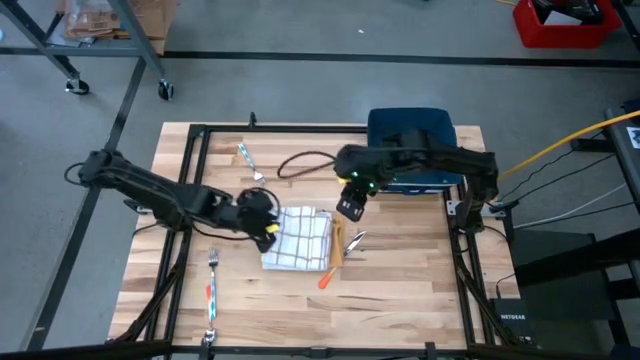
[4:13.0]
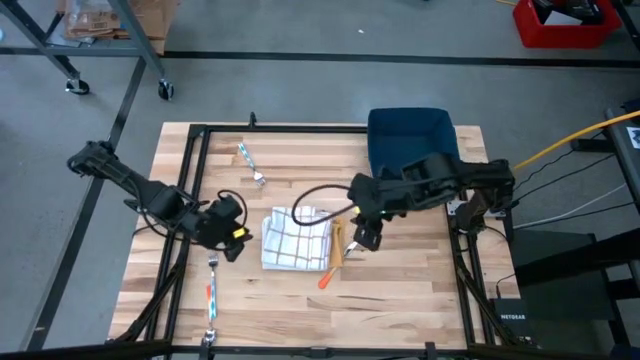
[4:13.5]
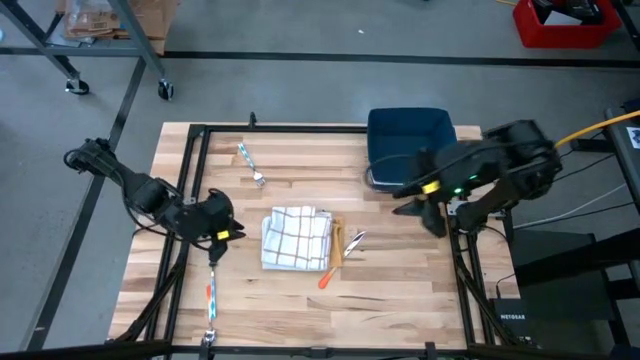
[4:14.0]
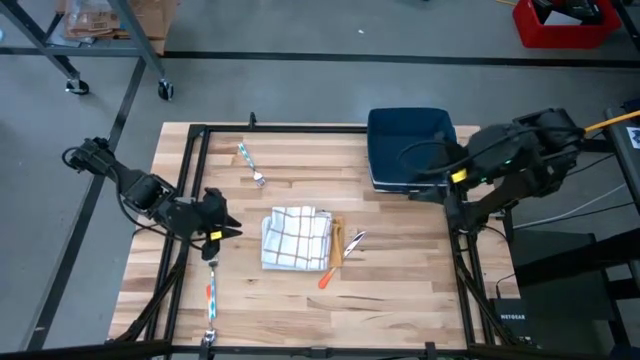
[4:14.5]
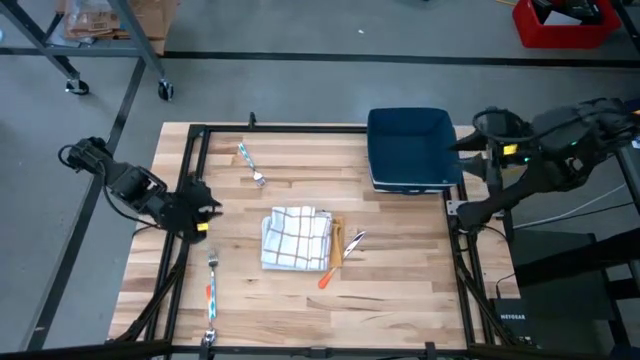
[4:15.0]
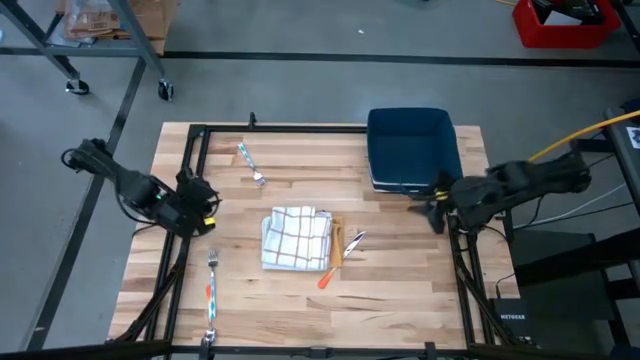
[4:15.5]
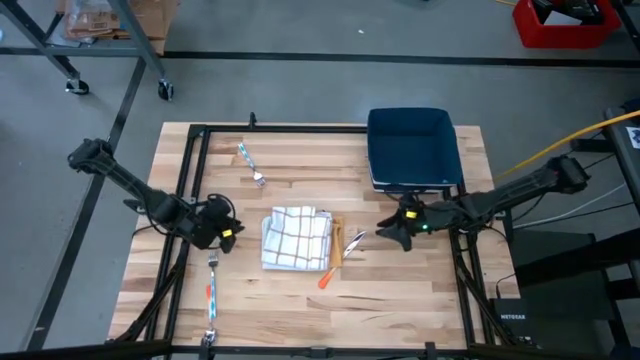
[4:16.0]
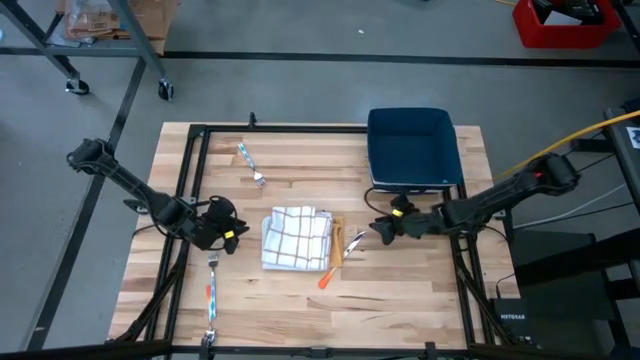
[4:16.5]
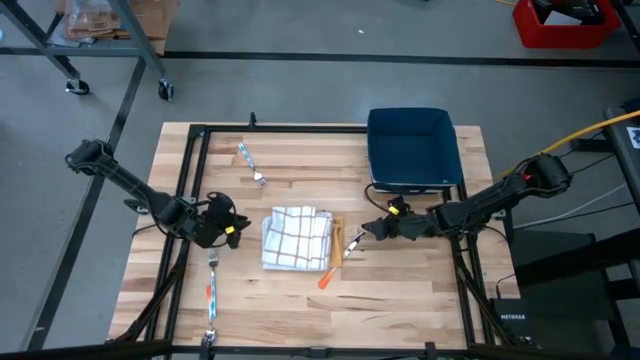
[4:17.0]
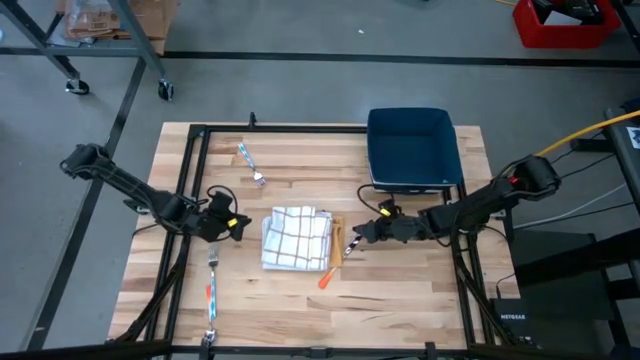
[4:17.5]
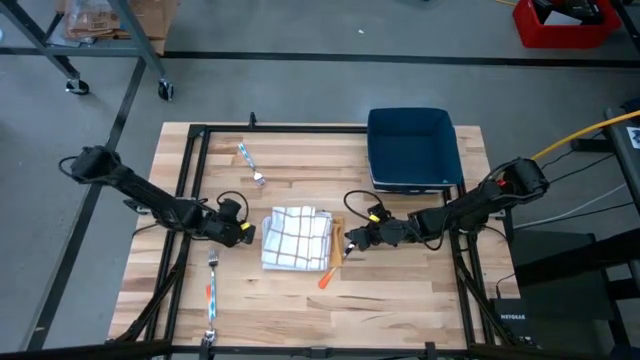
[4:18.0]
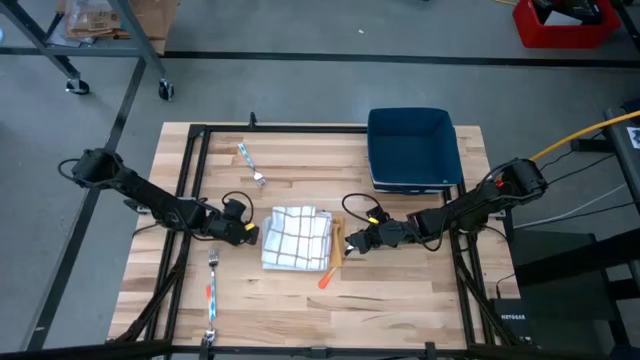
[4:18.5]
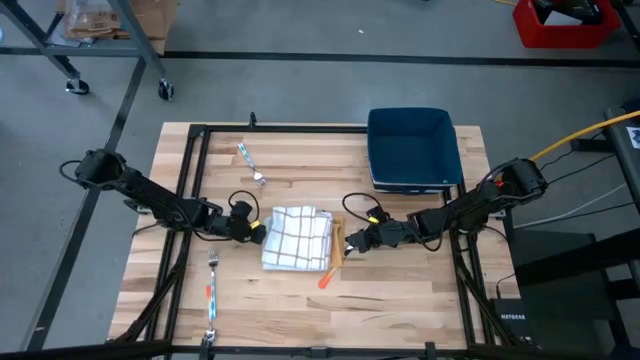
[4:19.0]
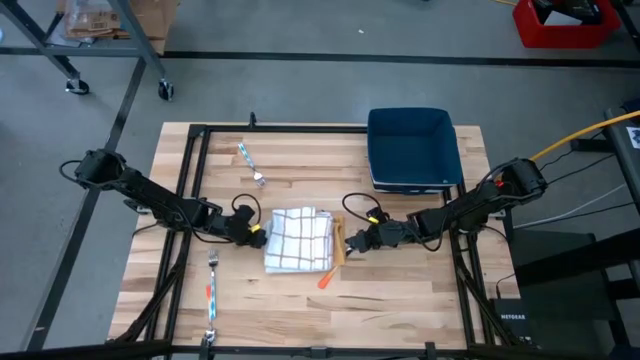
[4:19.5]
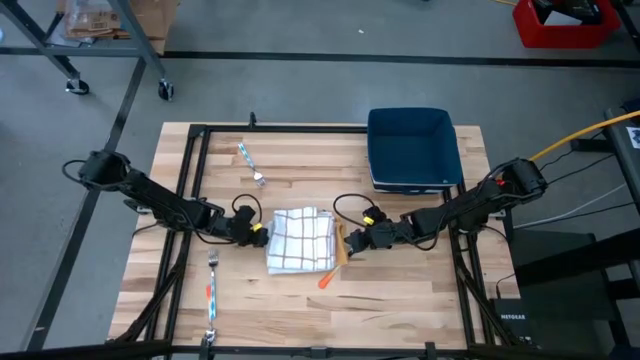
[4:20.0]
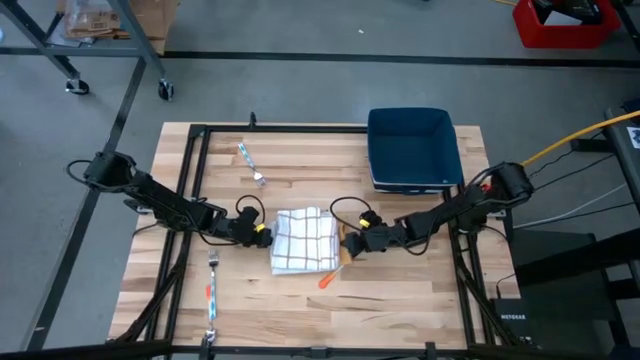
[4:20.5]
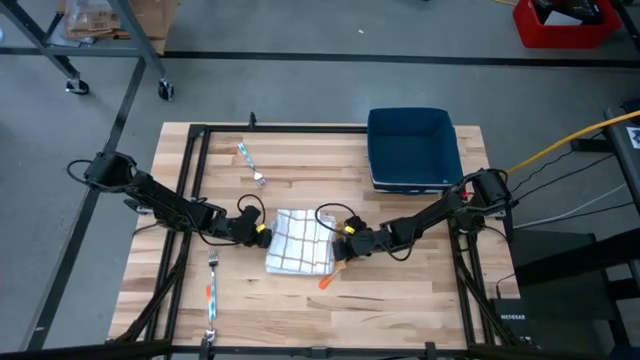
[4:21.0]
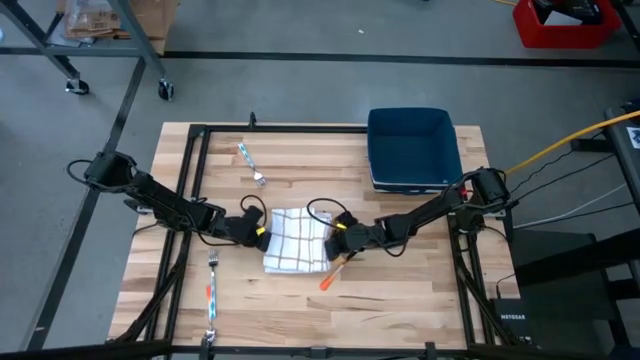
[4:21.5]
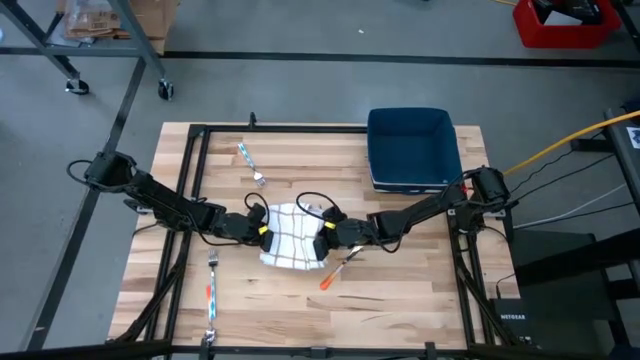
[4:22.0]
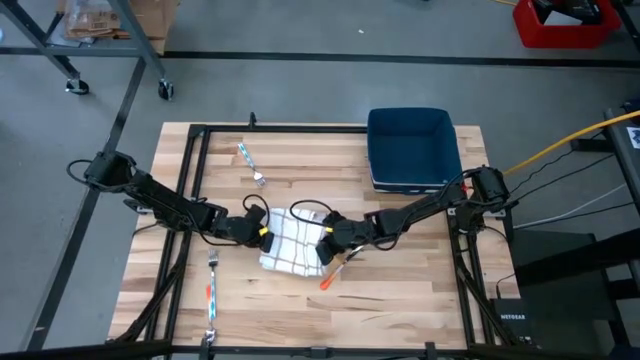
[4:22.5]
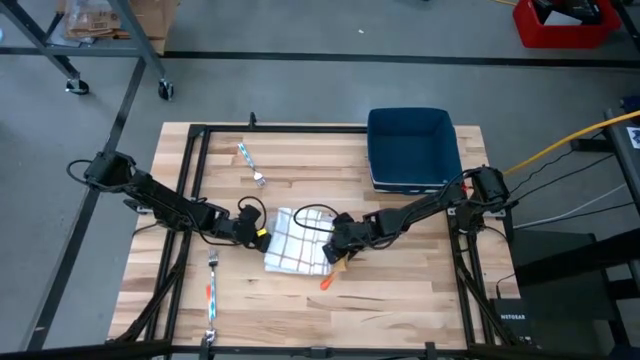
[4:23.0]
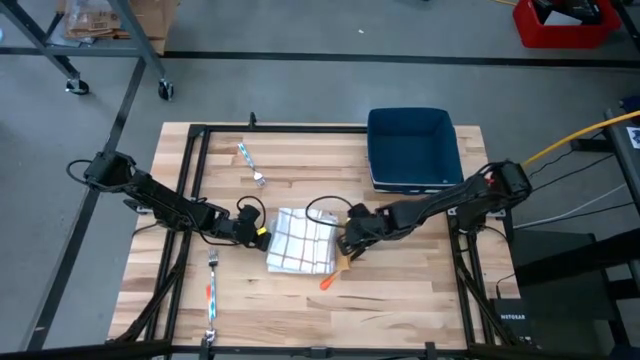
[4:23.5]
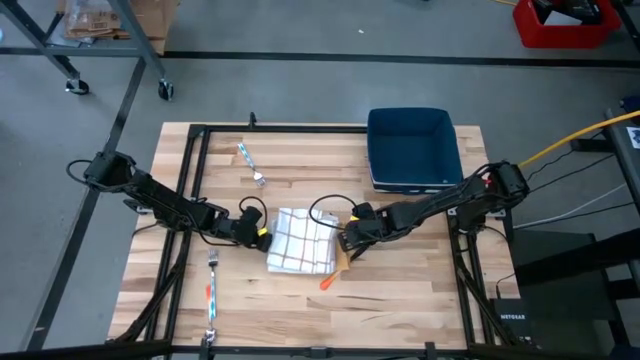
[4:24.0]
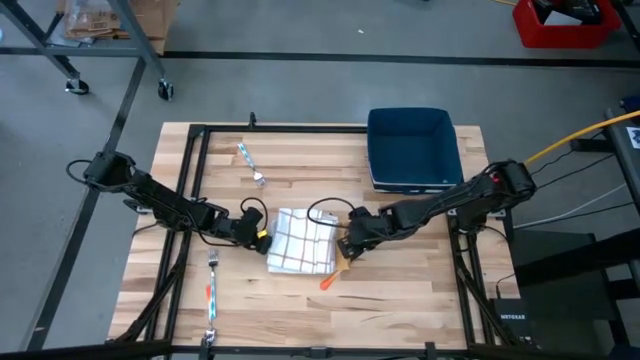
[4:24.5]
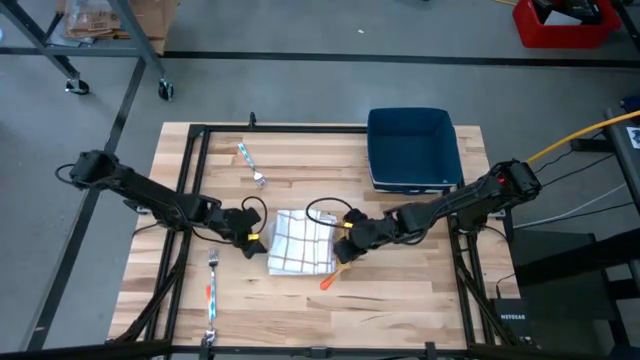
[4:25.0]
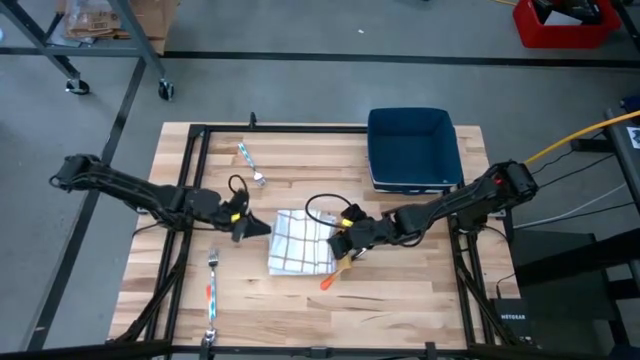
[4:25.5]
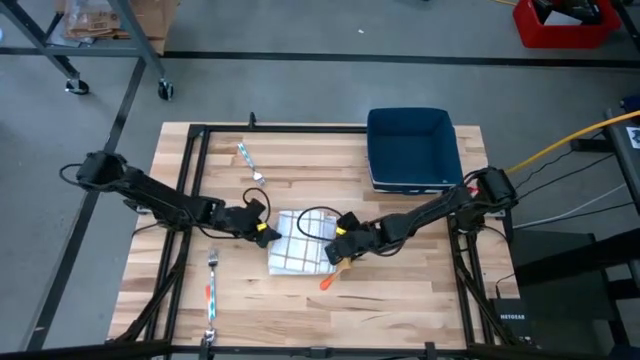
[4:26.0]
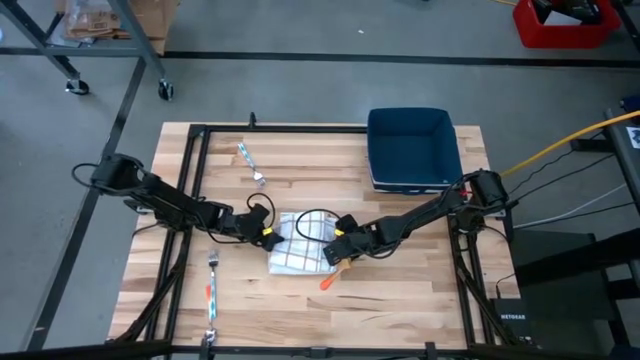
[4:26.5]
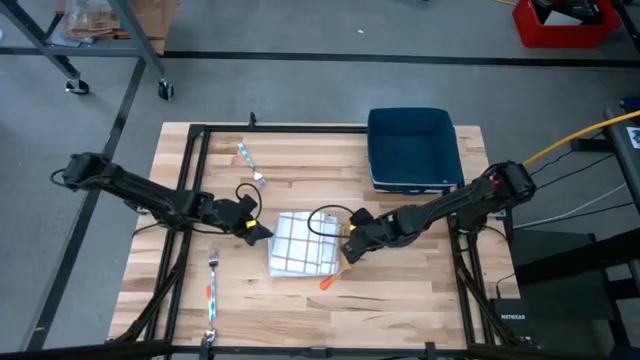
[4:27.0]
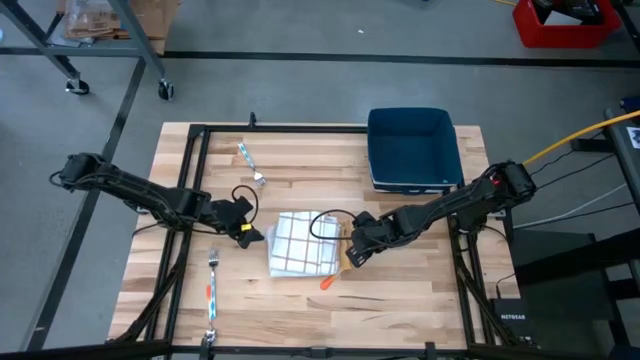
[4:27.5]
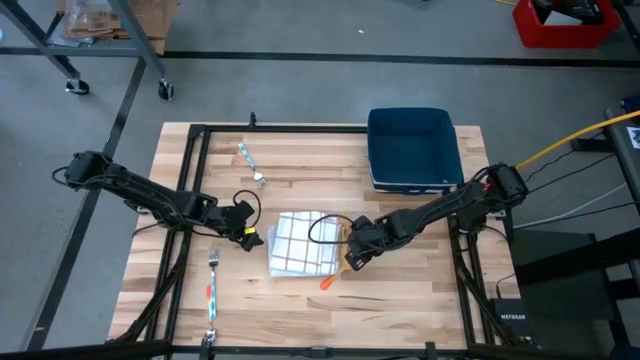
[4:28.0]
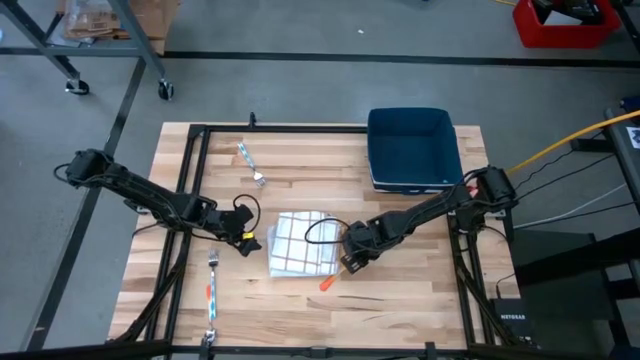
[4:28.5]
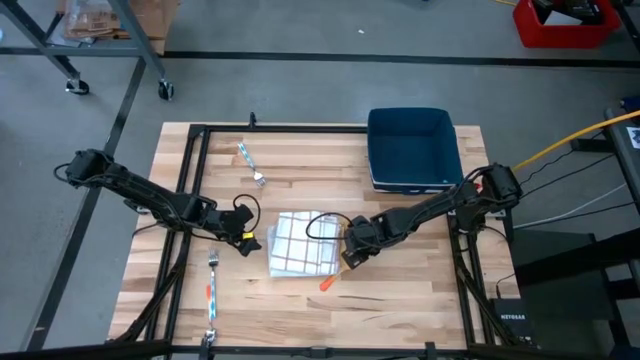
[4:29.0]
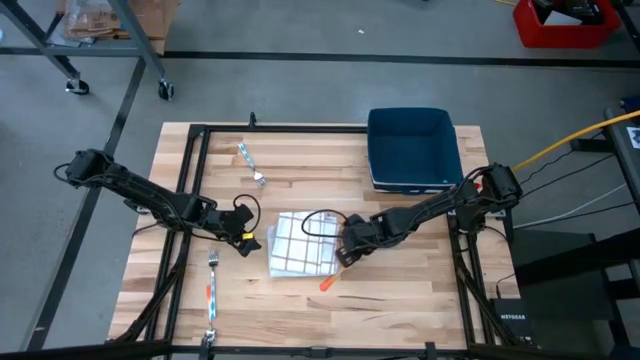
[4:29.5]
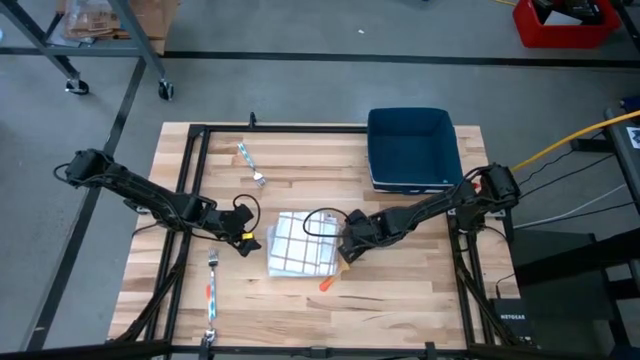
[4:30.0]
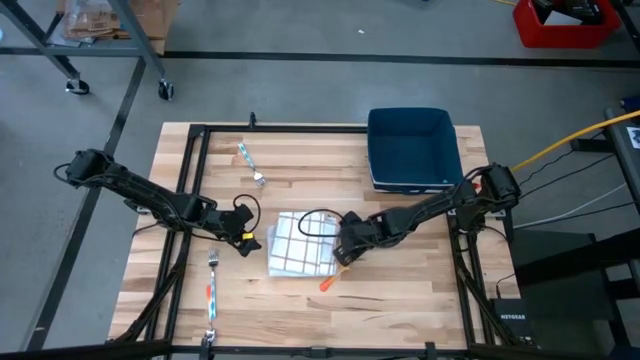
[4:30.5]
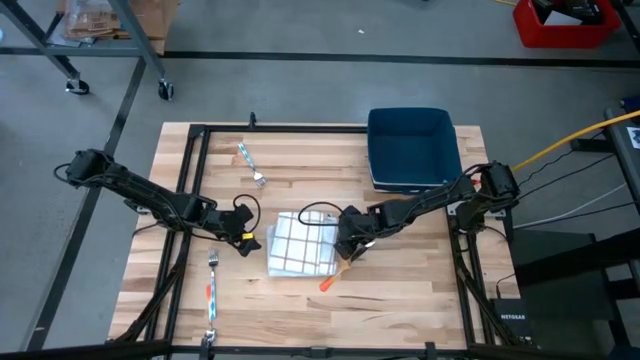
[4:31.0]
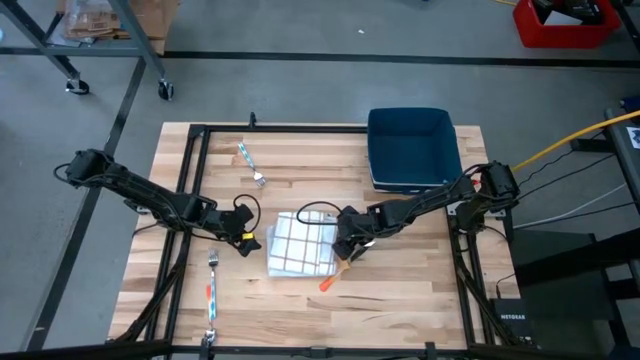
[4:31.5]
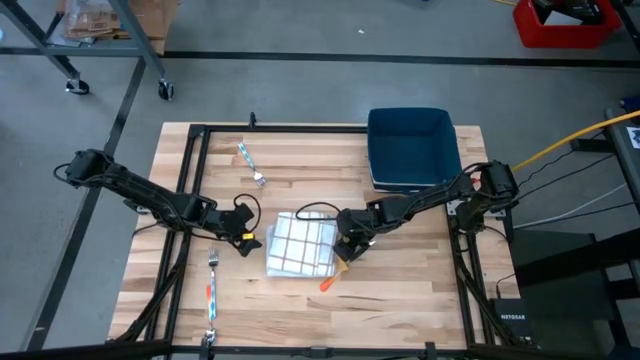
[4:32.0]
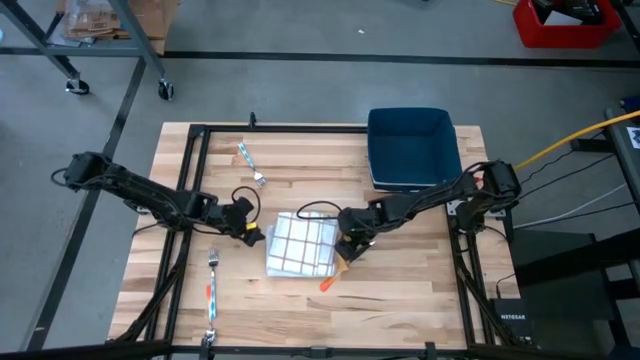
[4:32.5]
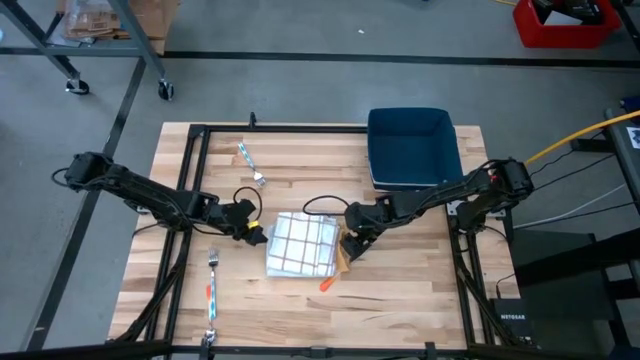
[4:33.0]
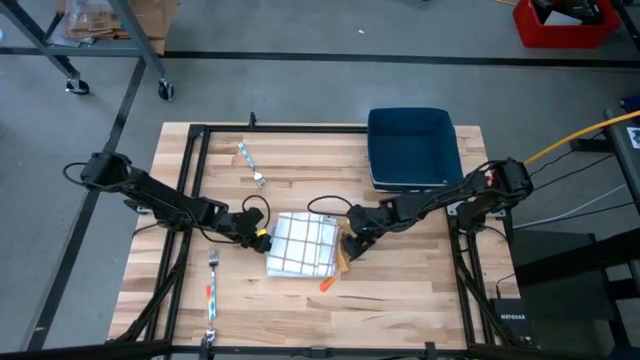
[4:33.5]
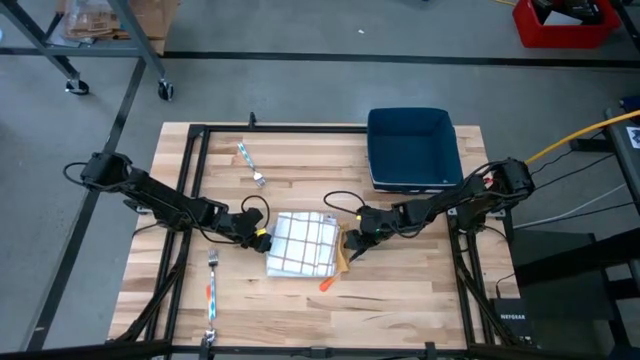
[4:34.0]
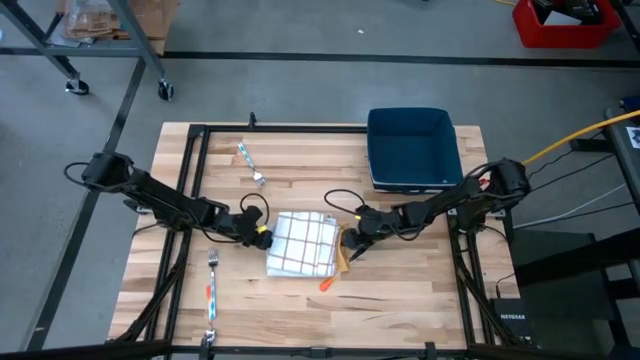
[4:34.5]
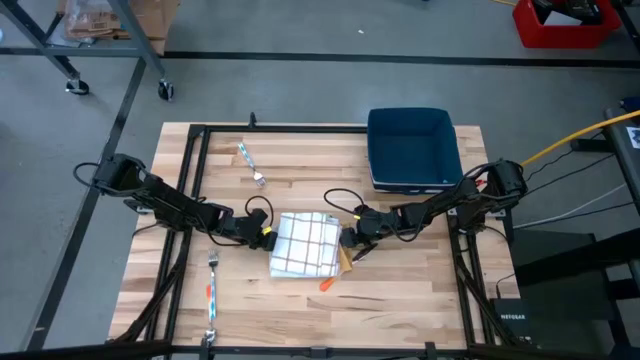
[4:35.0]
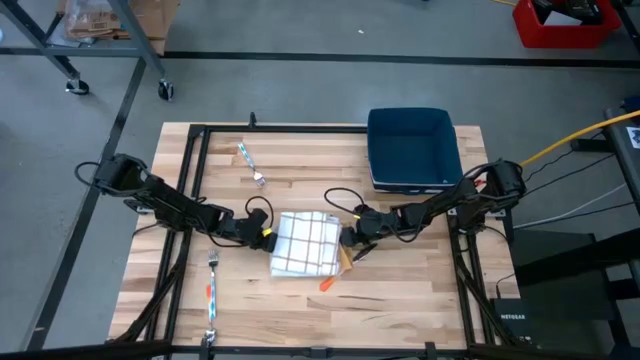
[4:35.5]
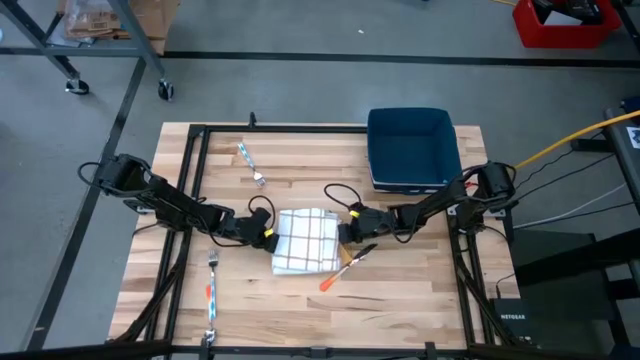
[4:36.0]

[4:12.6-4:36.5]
Task: Fold towel
Put the stacked folded towels into the blue bin
